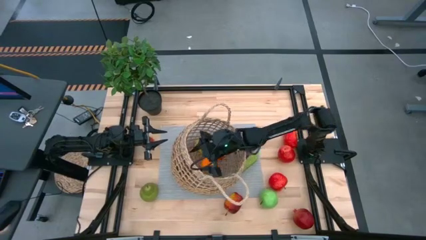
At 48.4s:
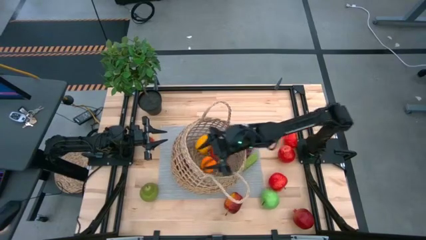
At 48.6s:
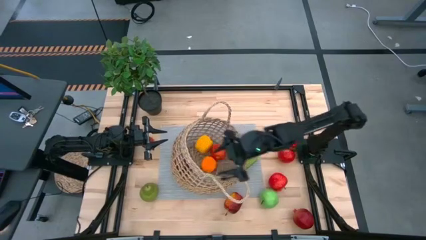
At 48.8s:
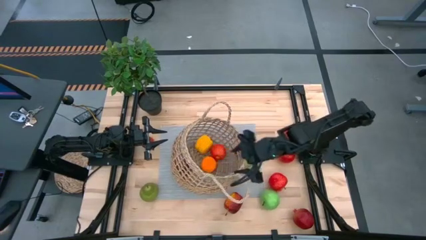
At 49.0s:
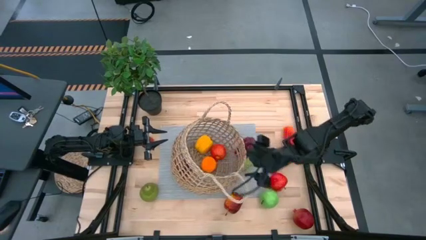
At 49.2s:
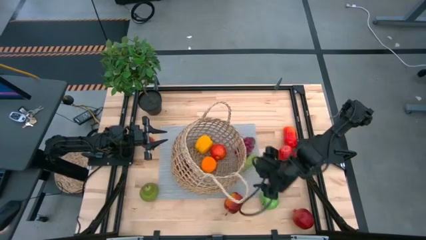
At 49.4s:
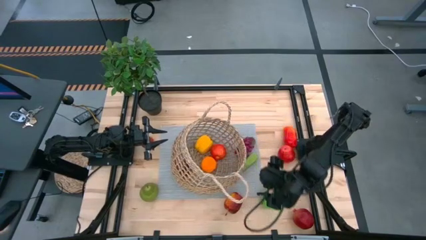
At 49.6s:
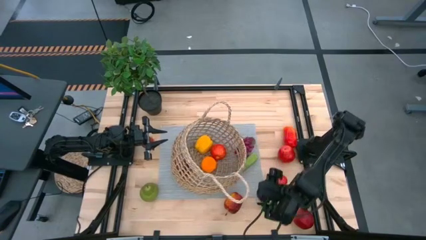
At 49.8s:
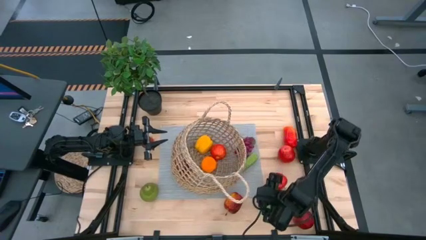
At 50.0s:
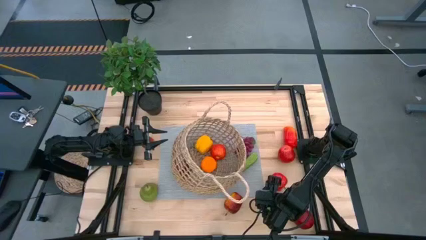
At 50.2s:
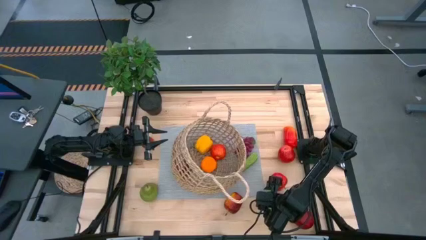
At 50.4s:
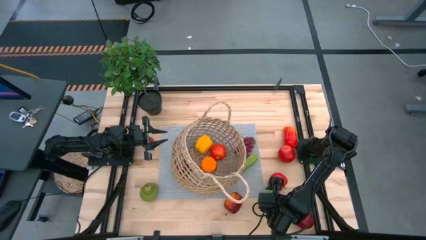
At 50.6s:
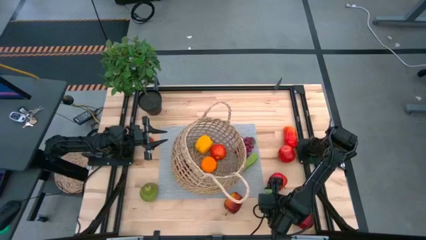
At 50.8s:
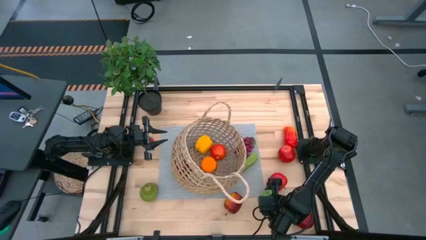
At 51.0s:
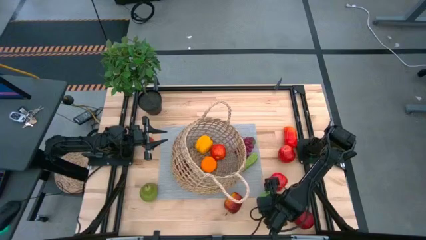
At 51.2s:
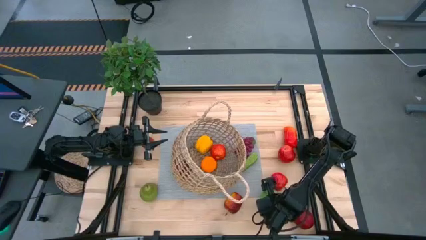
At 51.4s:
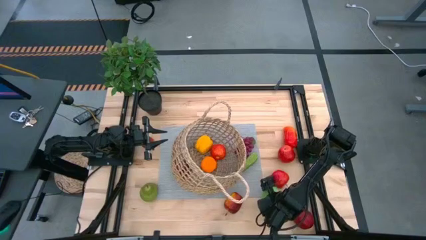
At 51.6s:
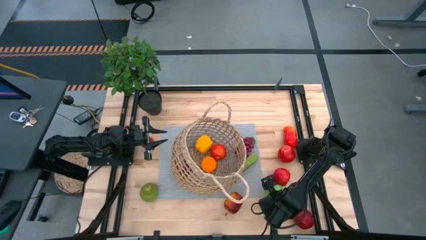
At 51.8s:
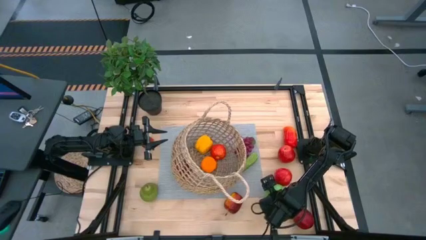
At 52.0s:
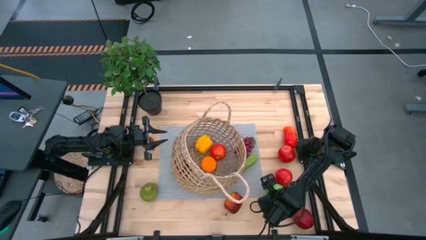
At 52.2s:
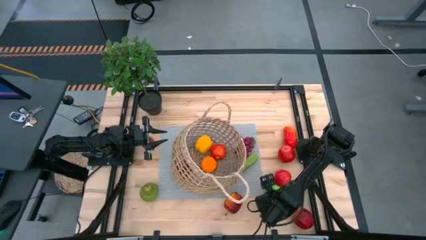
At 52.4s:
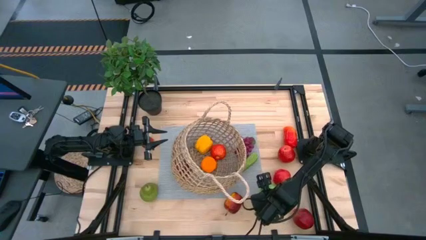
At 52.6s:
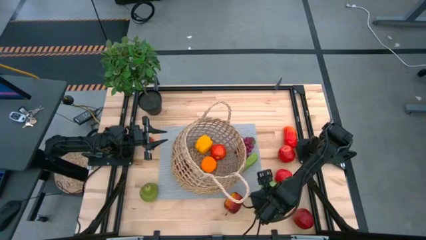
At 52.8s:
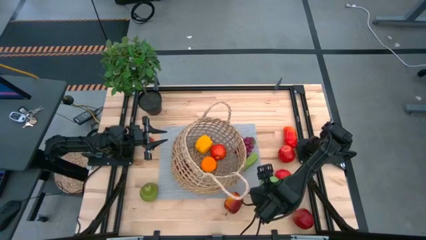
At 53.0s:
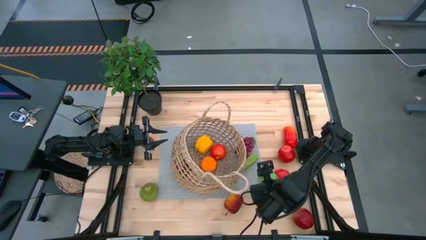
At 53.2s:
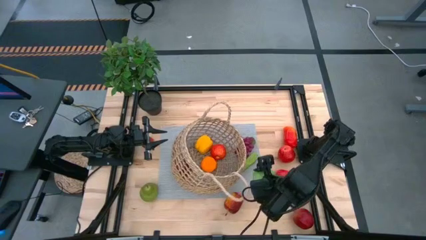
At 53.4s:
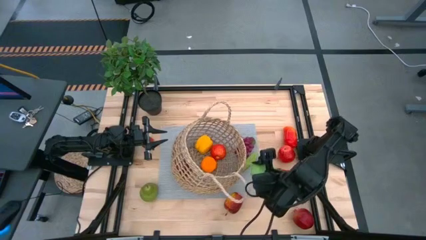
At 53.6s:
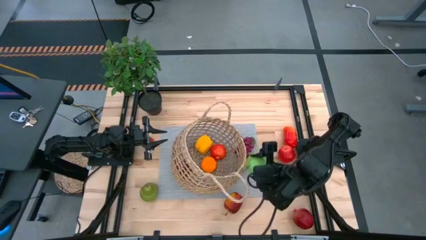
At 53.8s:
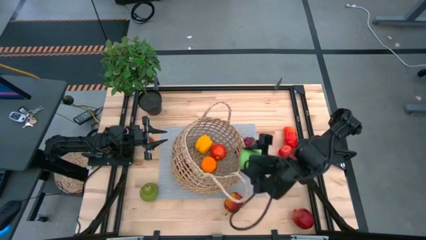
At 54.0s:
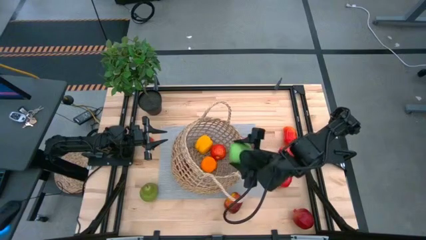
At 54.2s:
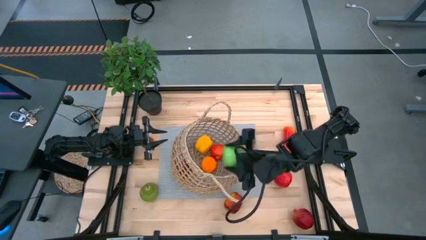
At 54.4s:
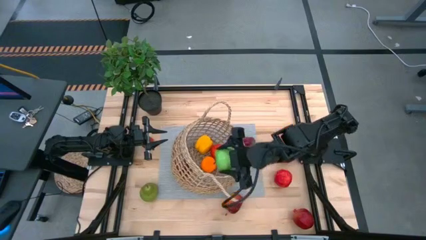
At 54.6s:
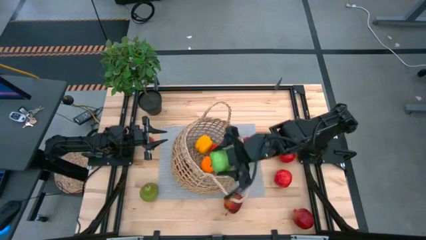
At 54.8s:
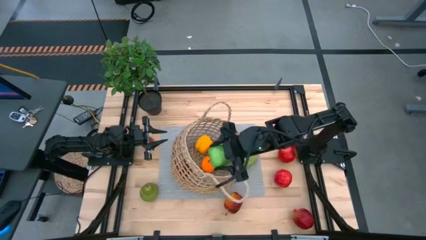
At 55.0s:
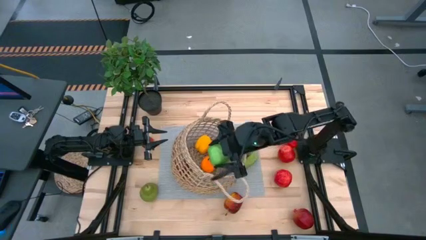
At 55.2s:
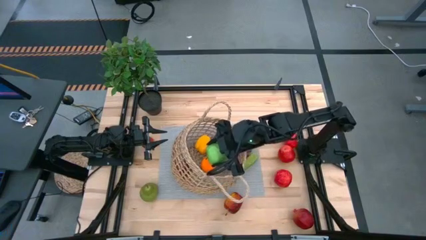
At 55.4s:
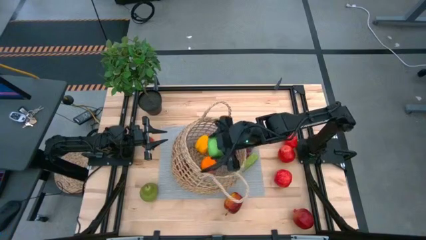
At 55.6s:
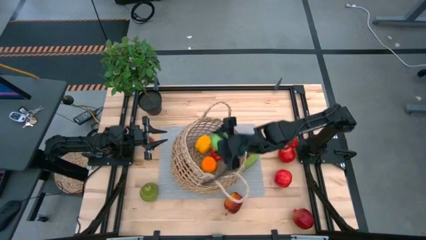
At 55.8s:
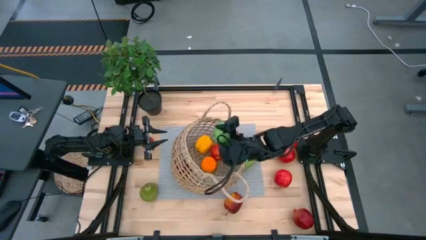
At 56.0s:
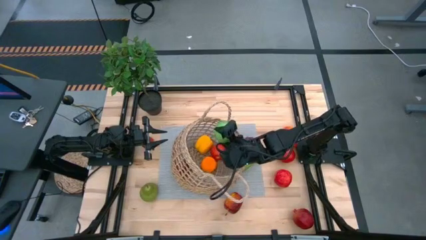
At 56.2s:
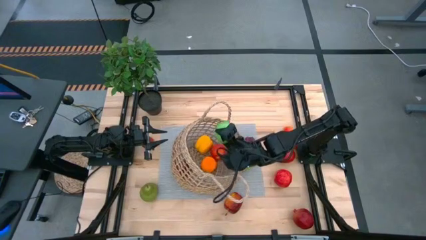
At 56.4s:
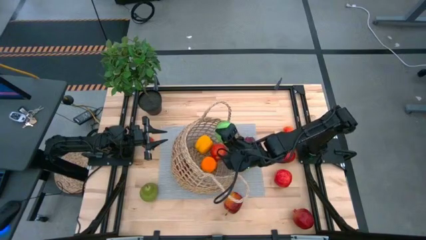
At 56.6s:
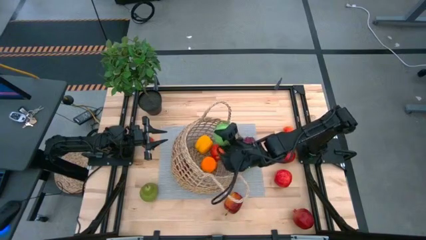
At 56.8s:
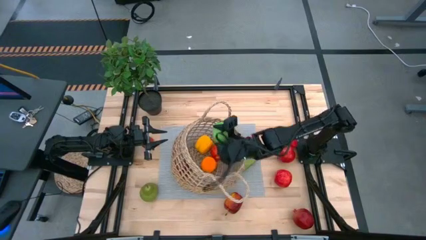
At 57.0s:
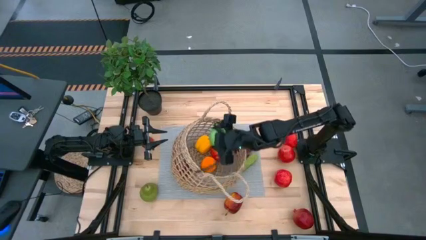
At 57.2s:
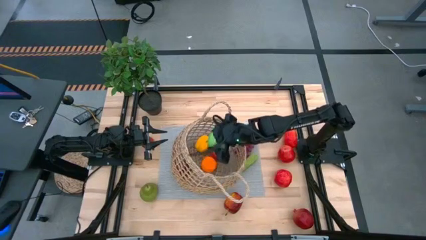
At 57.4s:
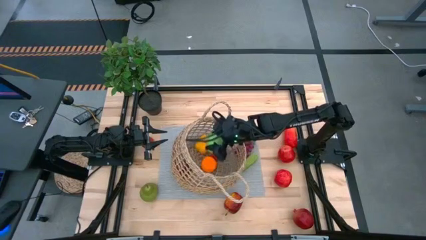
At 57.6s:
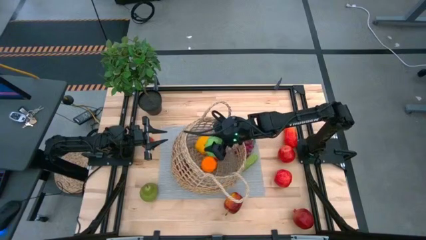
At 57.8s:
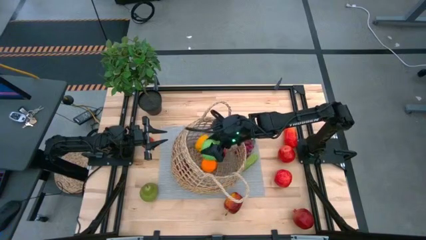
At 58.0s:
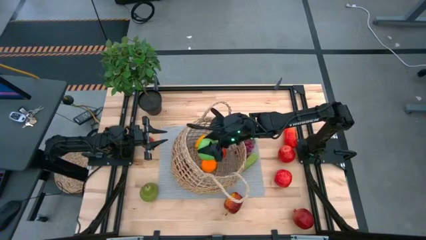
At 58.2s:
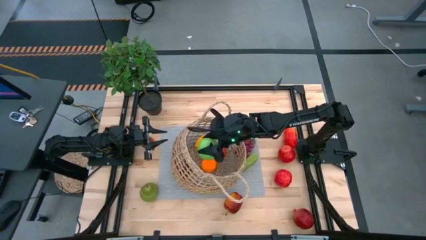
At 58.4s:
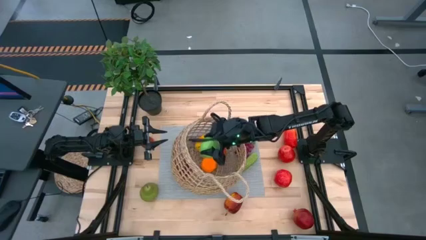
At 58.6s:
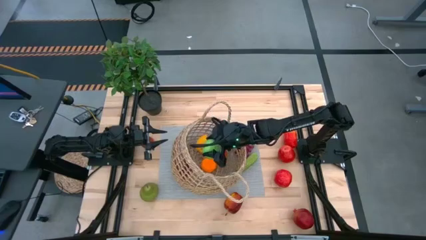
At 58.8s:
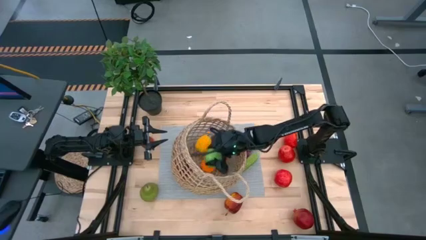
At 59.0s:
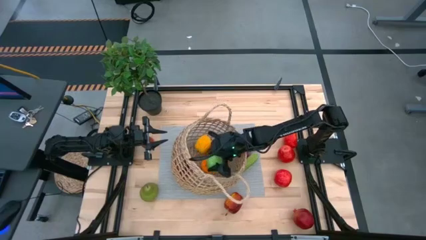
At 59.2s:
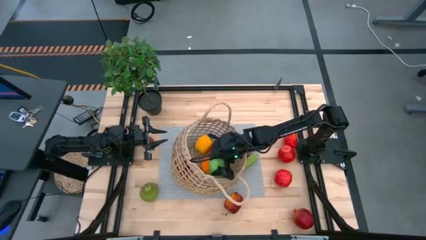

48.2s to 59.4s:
Task: Build produce basket
Put the green apple into the brown basket

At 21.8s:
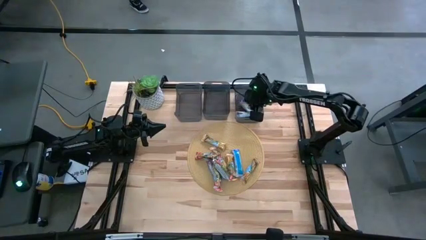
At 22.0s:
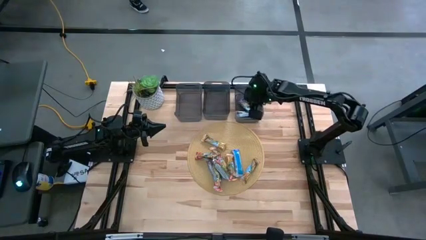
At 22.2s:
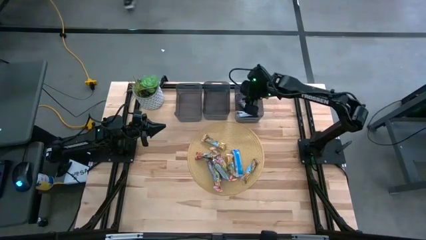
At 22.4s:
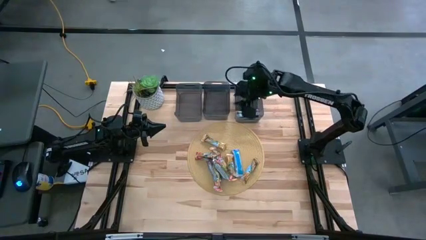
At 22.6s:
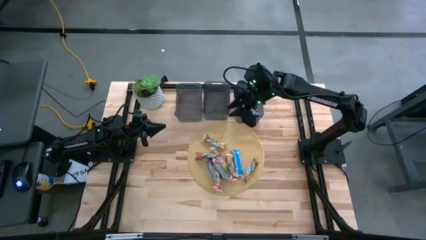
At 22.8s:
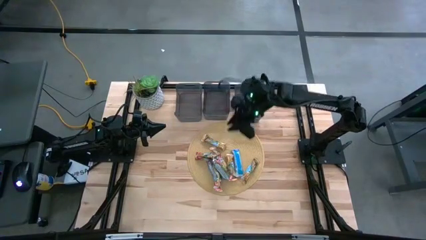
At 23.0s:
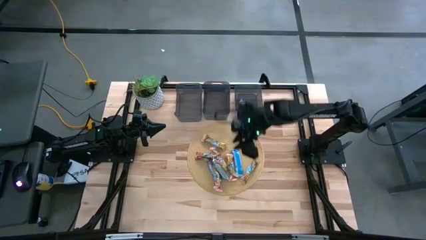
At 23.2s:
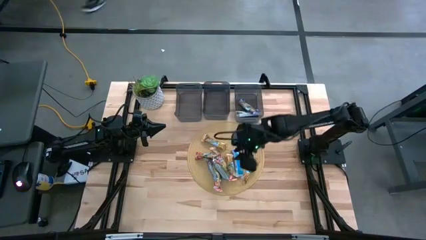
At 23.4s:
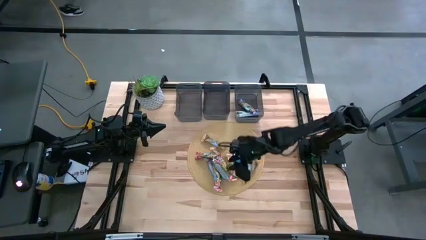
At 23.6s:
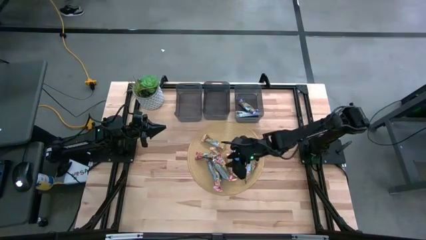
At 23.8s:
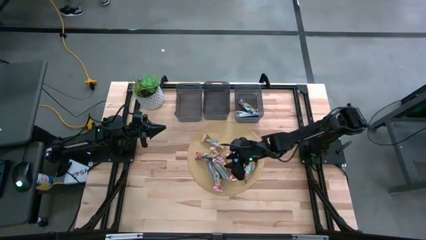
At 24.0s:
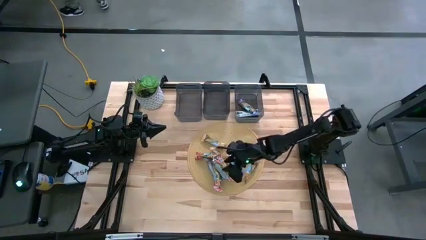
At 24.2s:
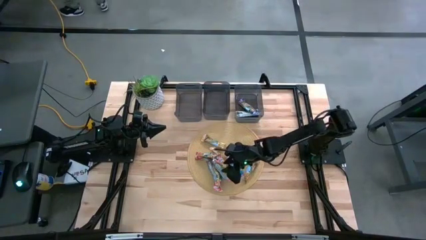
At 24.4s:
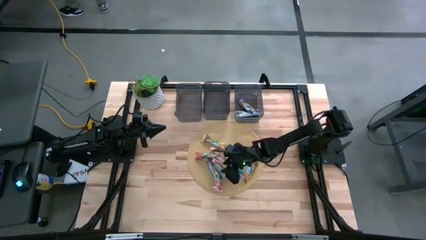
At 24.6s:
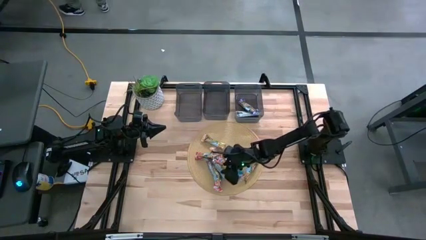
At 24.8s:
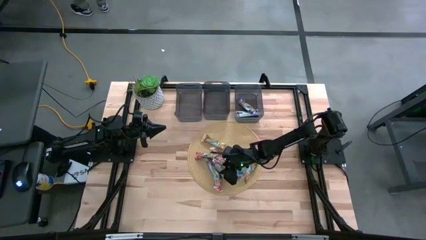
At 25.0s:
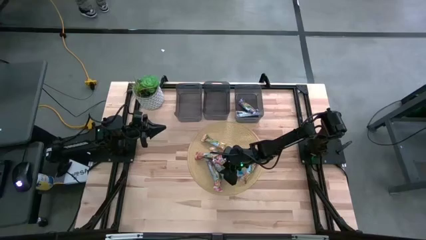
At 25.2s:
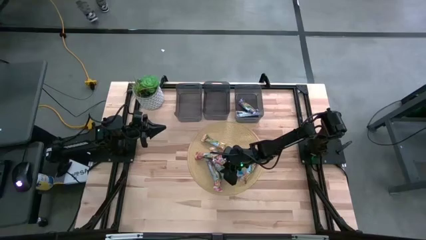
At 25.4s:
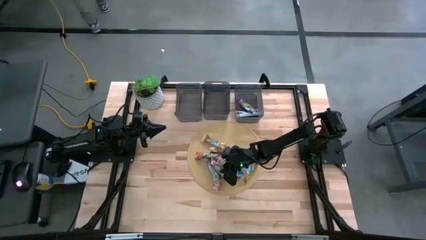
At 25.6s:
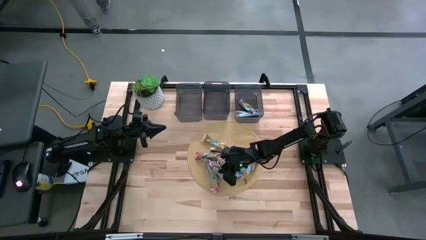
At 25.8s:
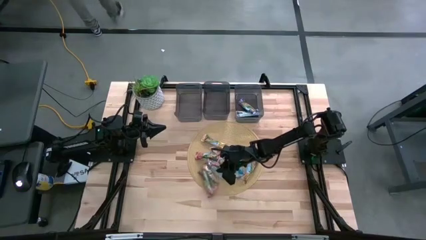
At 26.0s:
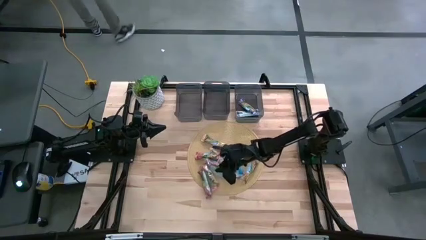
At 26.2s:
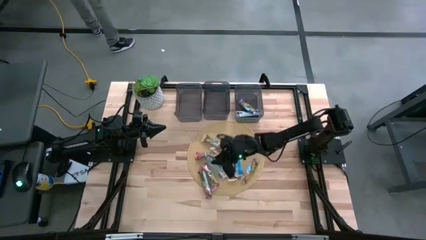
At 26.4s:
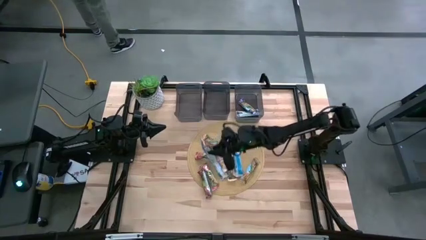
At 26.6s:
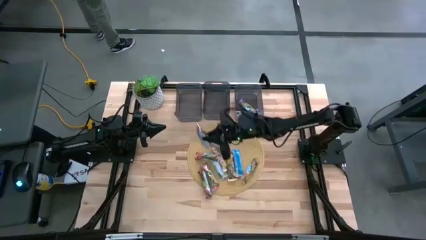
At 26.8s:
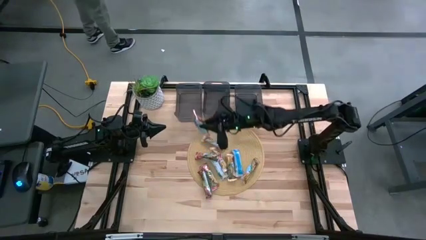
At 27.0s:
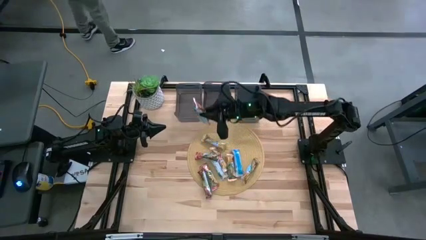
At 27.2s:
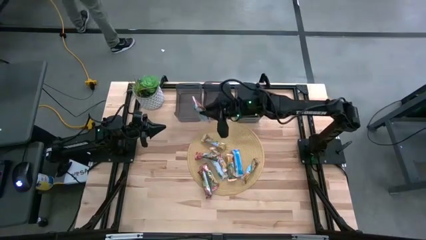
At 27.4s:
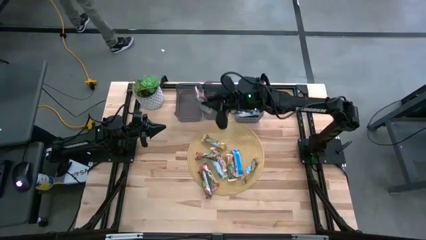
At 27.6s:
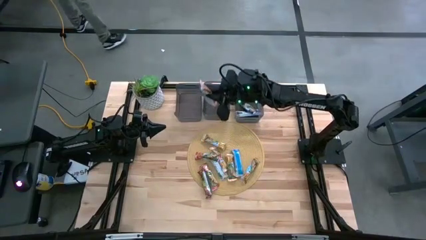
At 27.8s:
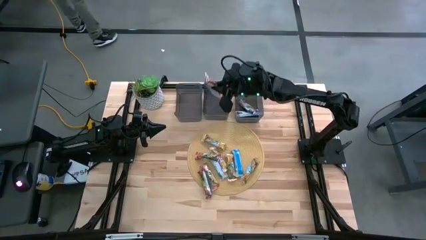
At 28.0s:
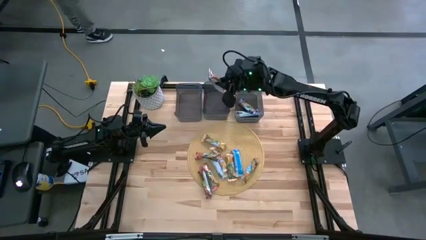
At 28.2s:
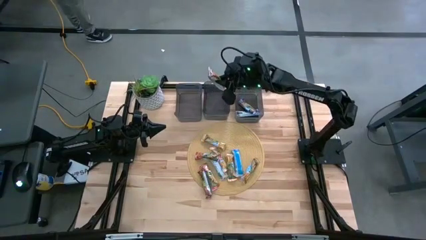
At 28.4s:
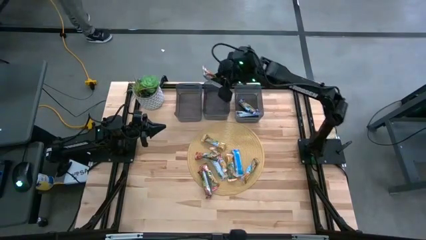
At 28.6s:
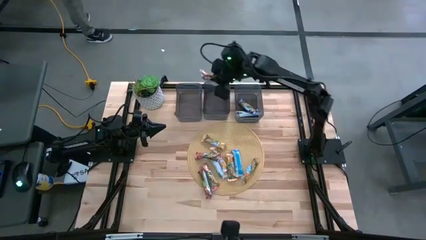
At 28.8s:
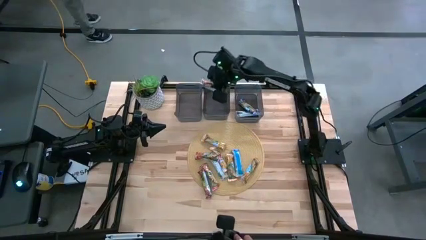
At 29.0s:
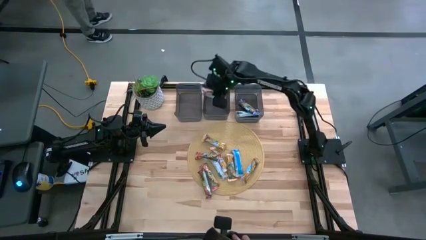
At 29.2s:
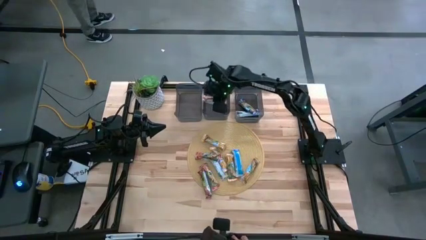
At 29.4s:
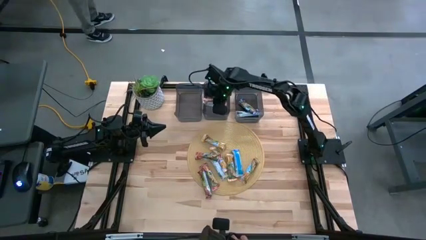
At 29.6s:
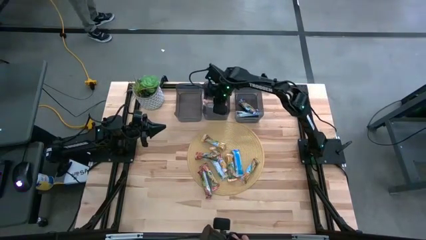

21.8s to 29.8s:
Task: Pick and place Granola Bars by type
Put the red granola bar into the middle black bin
